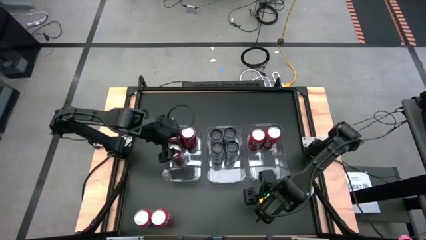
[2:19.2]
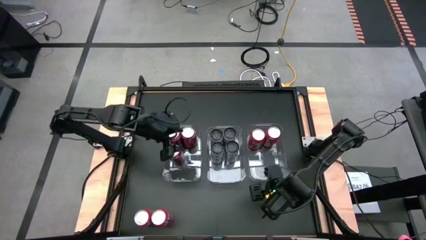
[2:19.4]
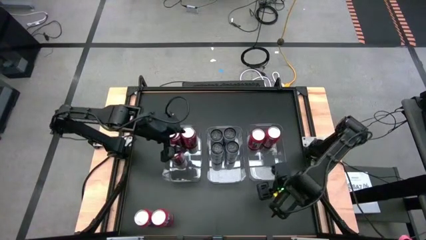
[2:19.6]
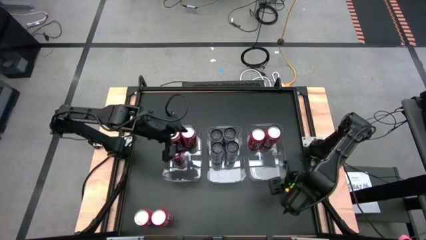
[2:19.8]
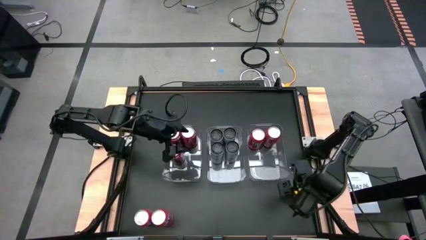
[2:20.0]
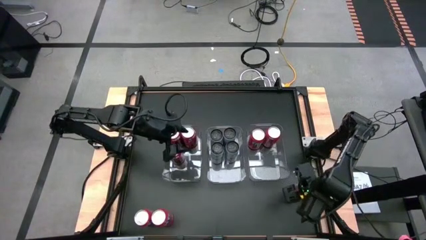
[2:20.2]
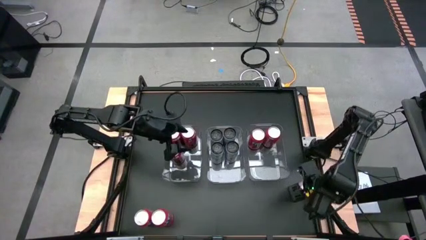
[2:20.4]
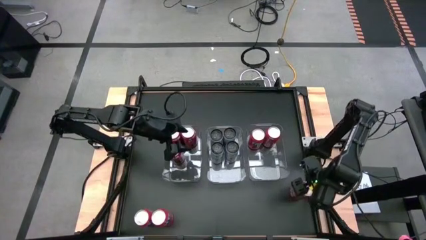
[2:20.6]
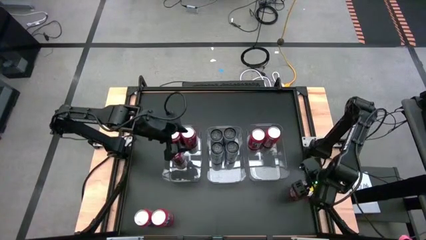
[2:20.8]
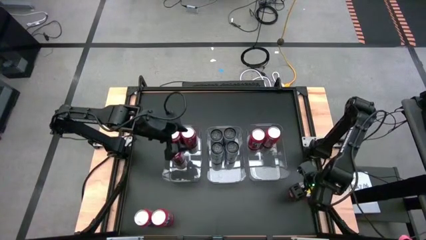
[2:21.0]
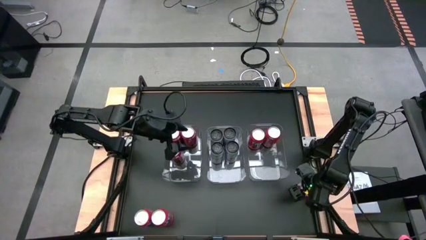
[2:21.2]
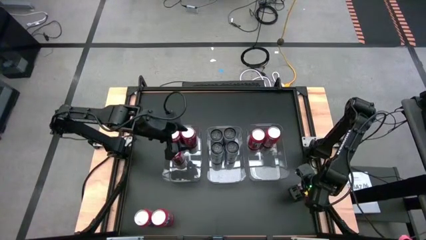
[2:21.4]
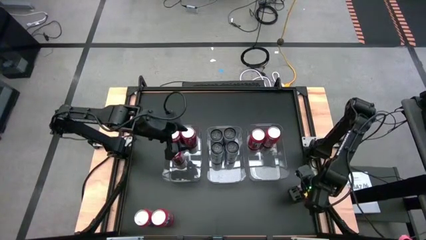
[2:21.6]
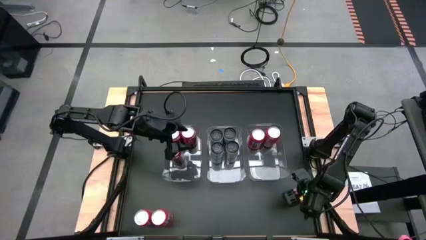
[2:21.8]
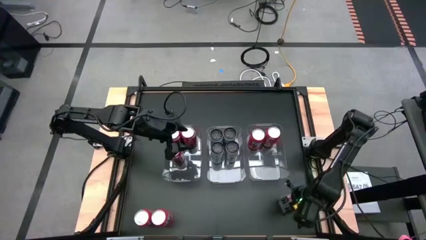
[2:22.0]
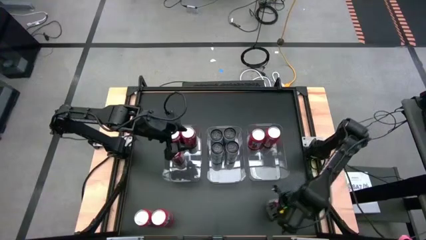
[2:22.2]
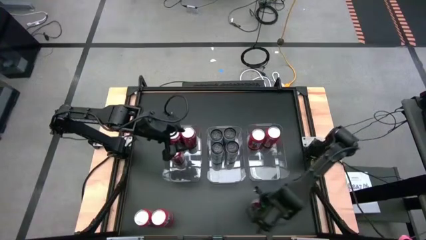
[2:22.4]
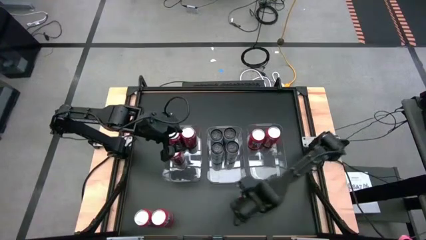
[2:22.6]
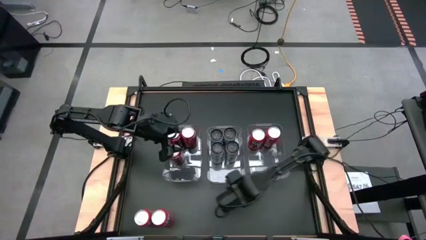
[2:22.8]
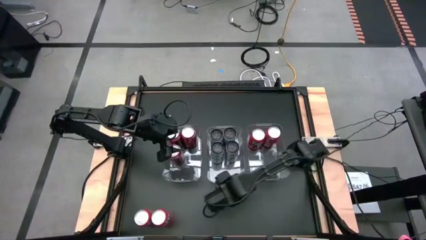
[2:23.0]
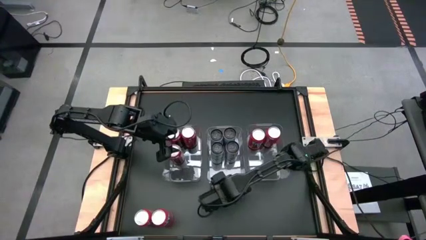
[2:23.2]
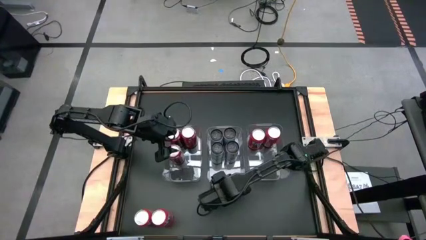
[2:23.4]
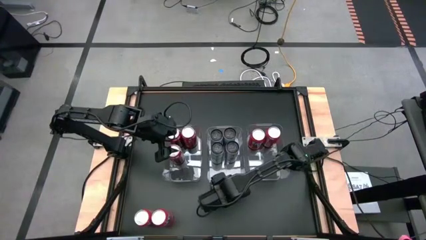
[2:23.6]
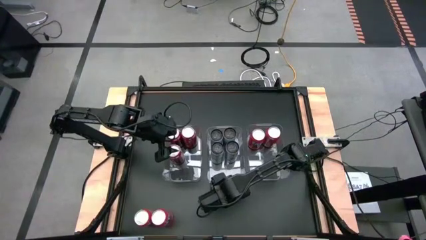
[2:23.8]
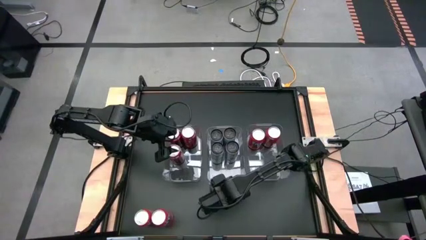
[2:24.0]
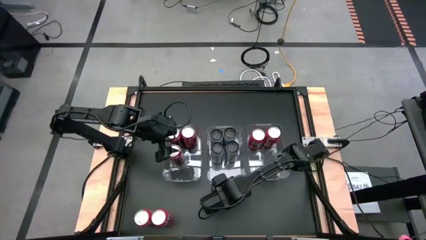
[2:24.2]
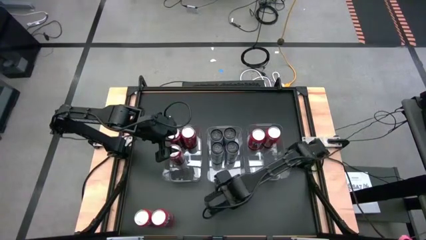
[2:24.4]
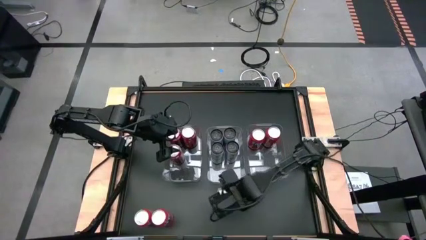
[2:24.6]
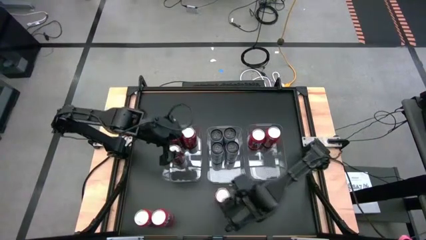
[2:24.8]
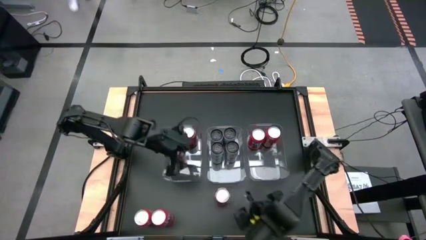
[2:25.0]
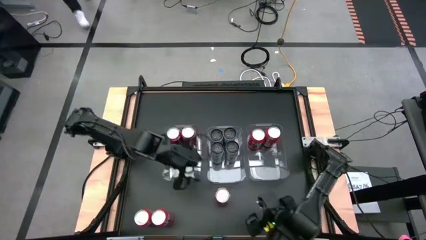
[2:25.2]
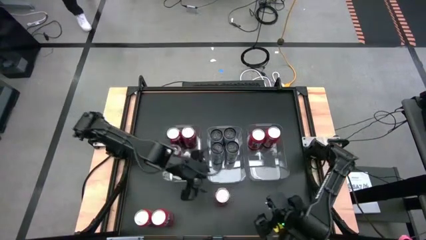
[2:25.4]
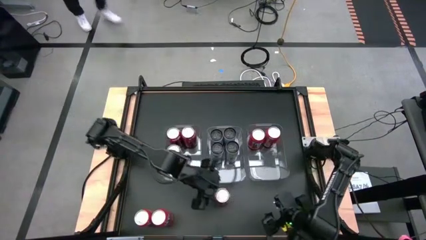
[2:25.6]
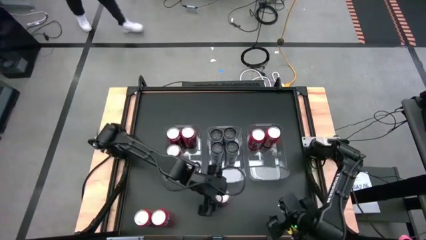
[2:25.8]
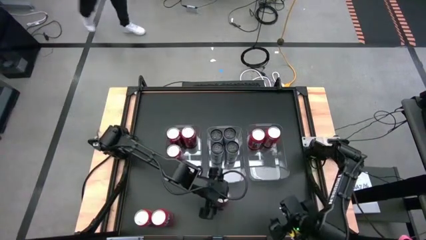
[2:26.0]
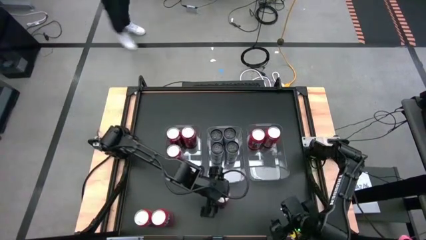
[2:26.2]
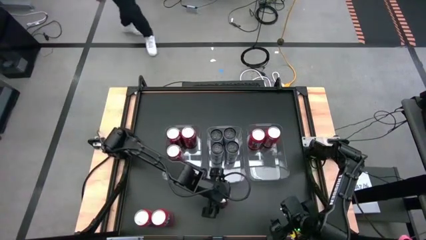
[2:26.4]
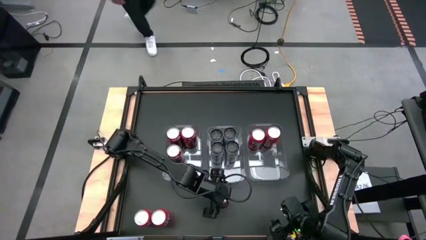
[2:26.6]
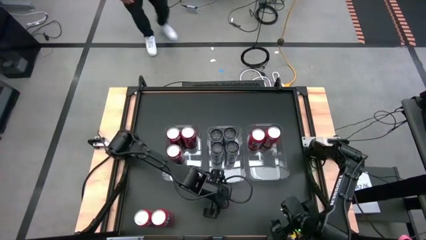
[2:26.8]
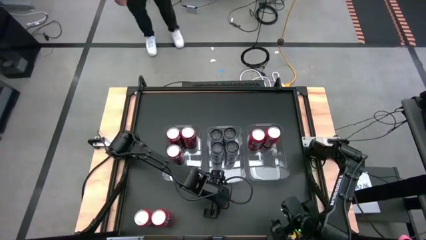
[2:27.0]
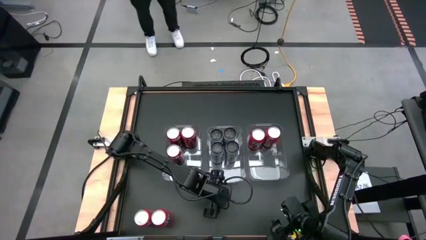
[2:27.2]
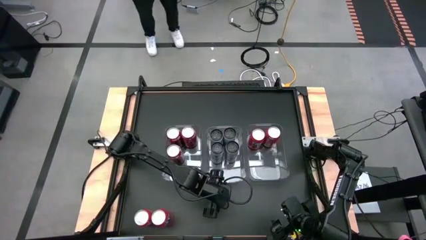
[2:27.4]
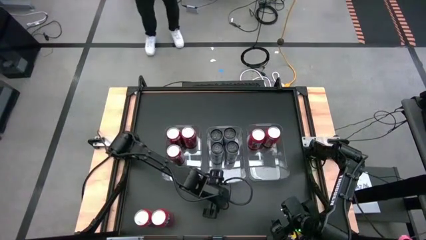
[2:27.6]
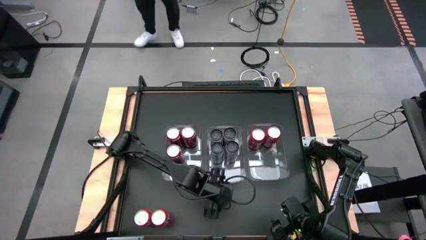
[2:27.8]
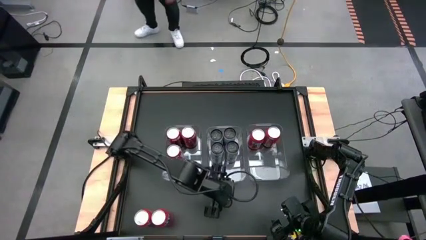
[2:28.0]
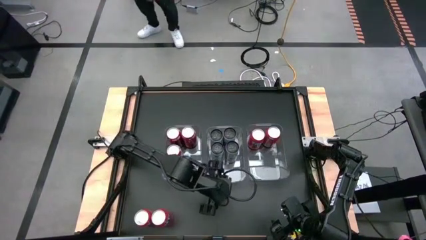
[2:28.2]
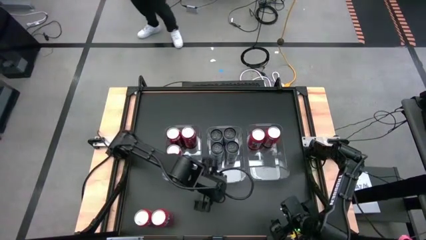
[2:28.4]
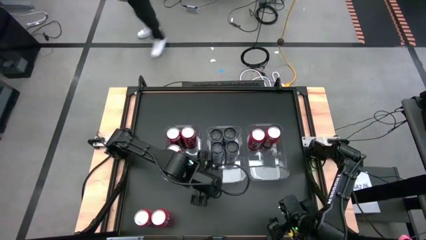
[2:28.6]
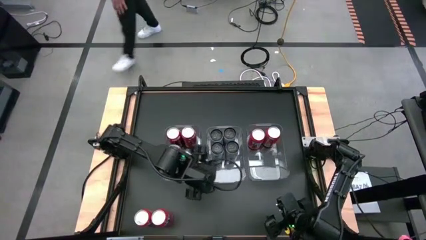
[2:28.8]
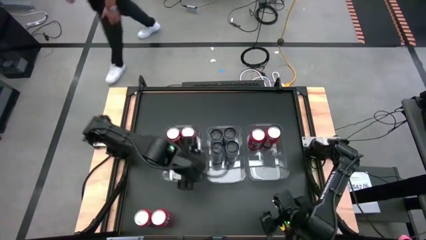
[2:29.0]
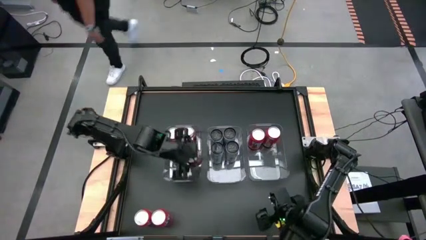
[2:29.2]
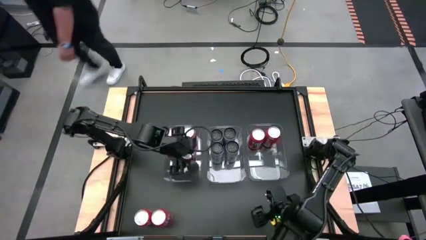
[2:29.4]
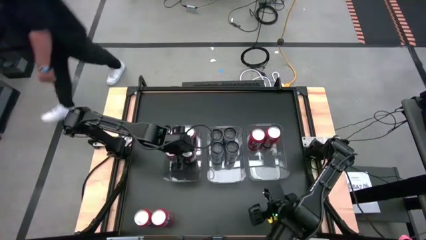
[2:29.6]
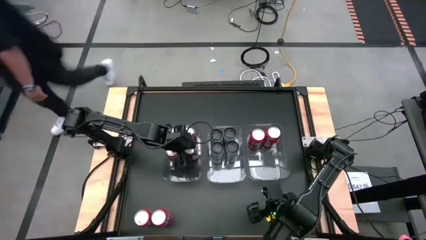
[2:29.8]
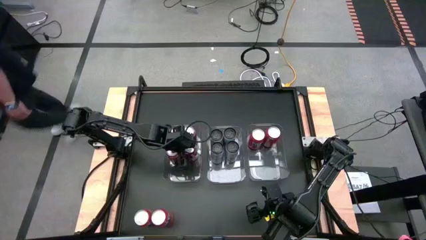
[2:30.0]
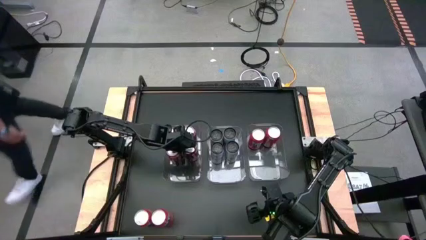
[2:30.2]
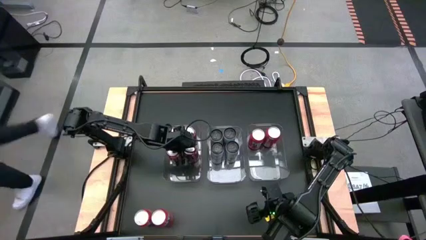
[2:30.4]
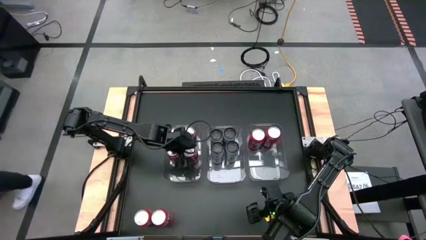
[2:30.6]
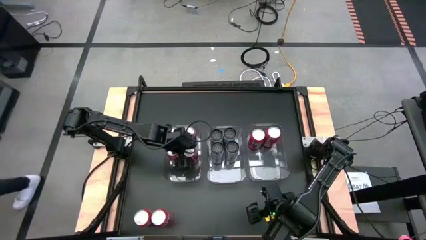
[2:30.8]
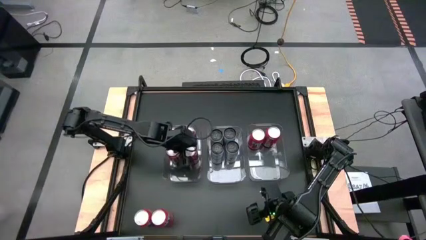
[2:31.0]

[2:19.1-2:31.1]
Task: Sort soda cans
Put the red soda can into the left transparent bin

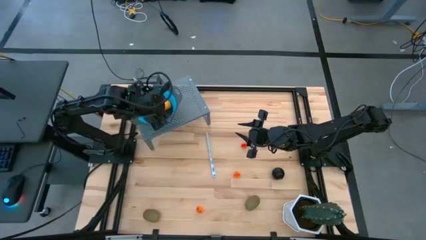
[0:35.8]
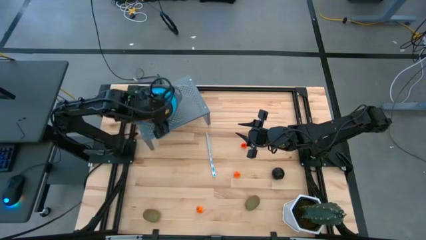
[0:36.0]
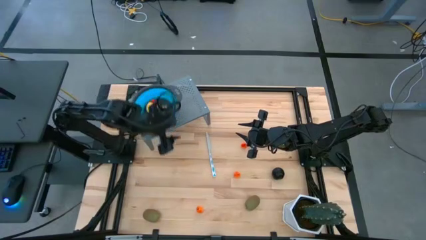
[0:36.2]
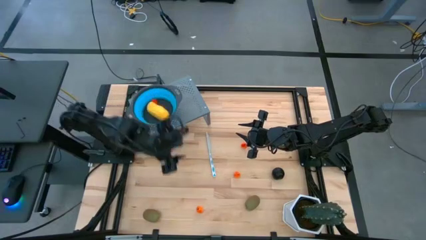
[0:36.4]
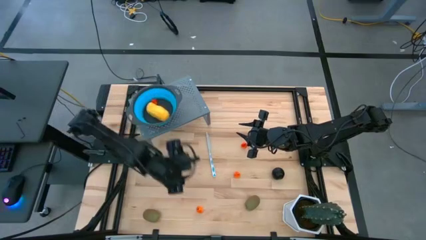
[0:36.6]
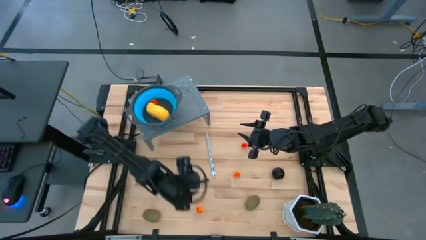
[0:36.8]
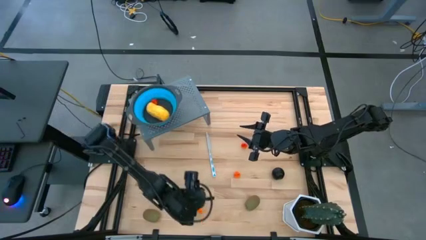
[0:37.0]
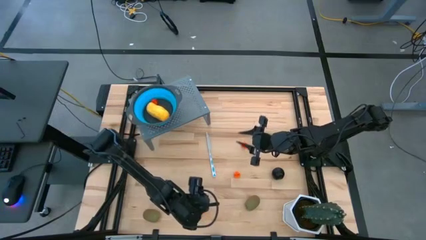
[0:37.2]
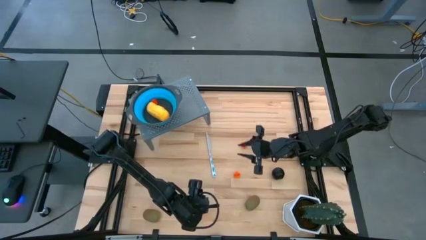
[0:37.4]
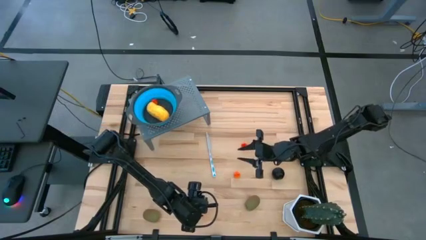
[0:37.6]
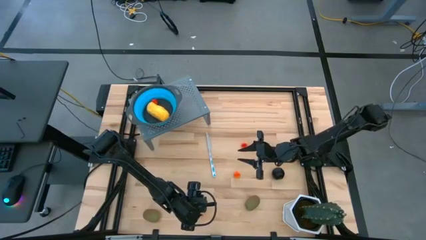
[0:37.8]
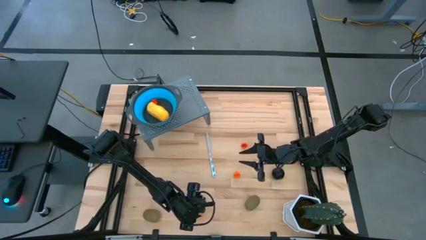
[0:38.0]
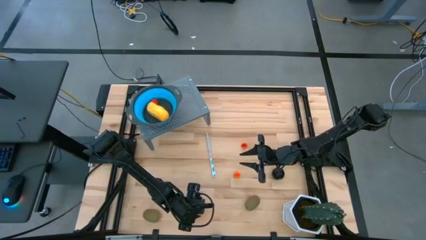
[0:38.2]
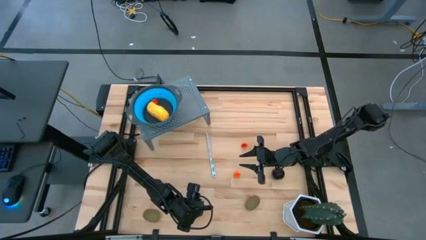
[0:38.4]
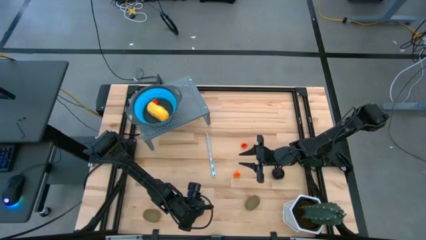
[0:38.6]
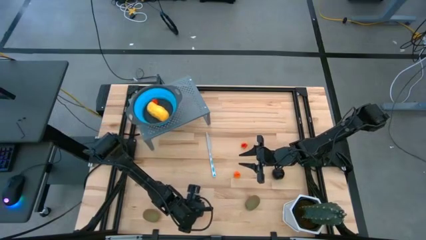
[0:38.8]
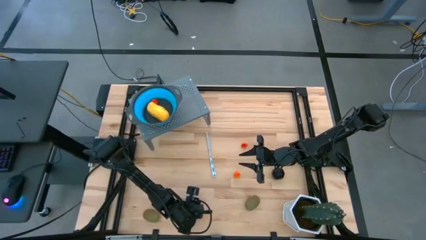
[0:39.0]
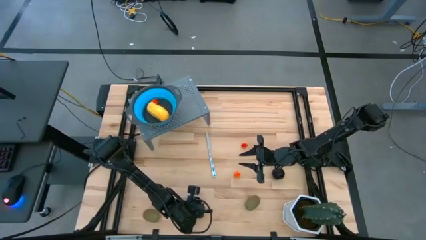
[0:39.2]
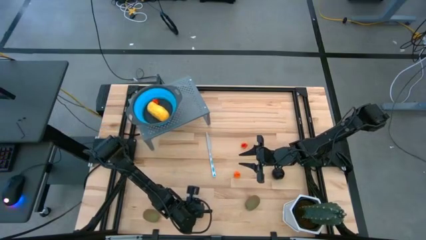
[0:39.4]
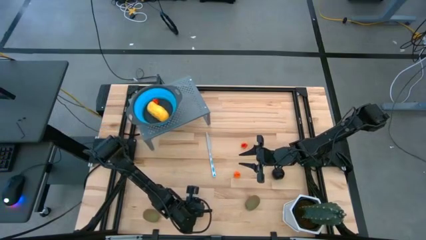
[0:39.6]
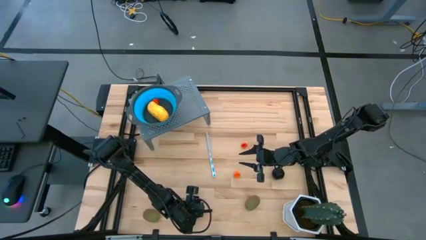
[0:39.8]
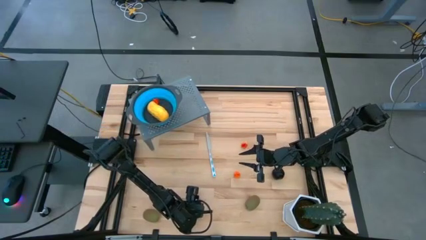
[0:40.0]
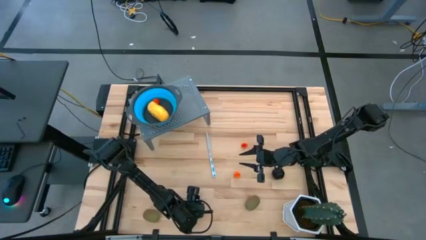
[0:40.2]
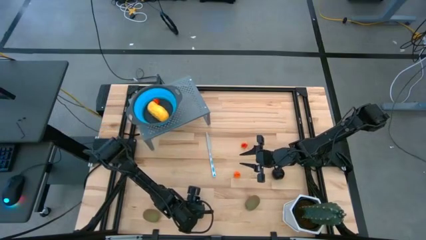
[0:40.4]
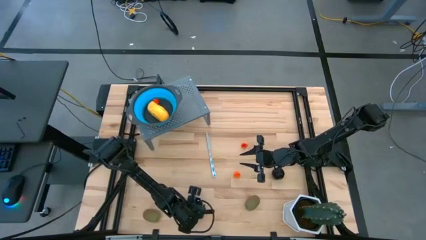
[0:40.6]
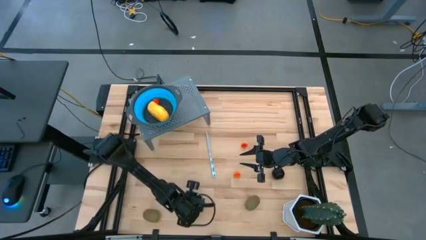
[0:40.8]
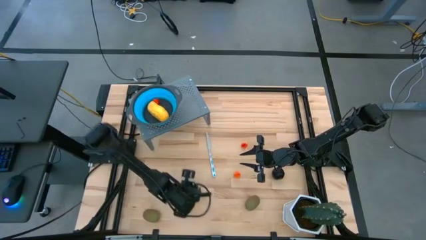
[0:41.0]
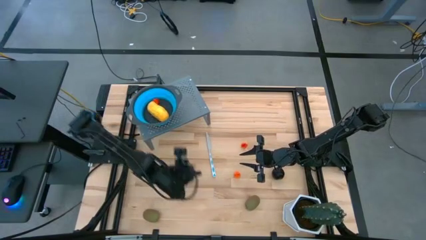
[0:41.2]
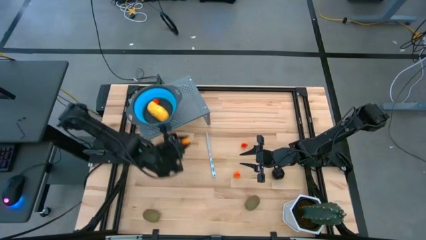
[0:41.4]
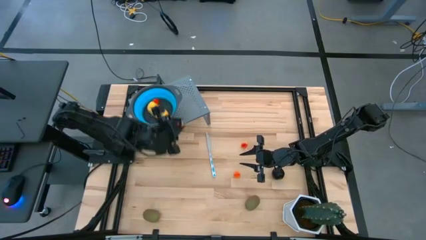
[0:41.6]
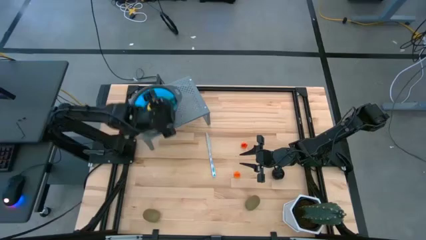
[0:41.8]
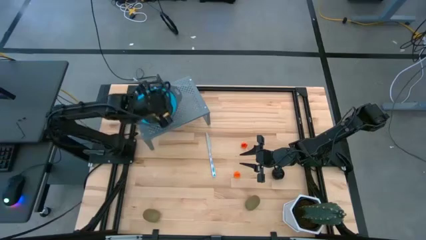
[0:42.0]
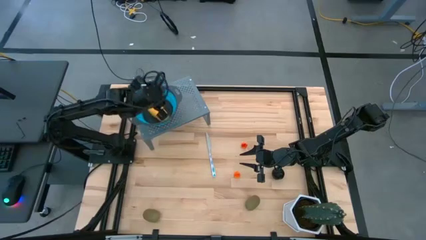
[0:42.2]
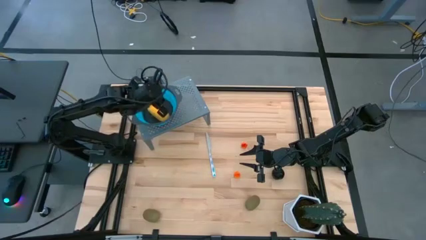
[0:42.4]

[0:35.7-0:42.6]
Task: Pick & Place Fruit
Put the orange peach into the blue strainer bowl on the shelf
